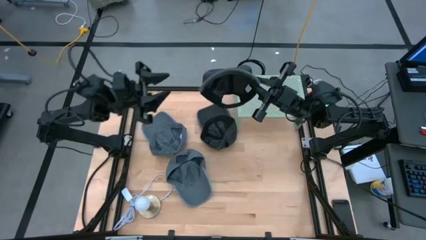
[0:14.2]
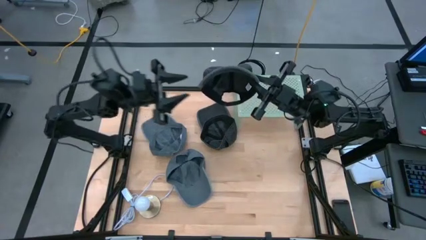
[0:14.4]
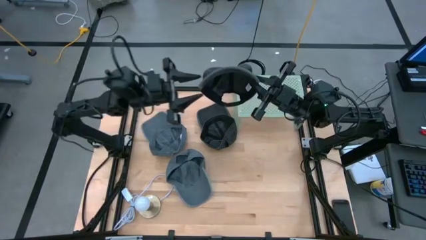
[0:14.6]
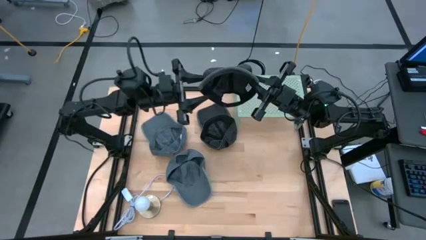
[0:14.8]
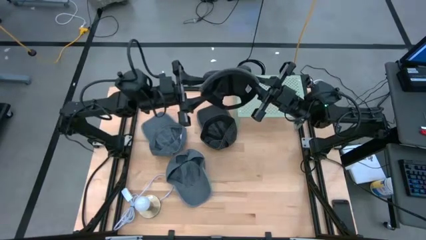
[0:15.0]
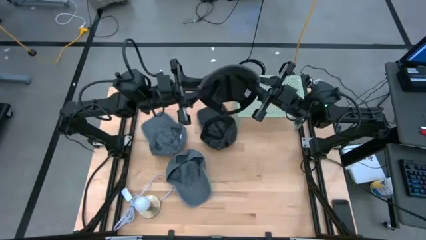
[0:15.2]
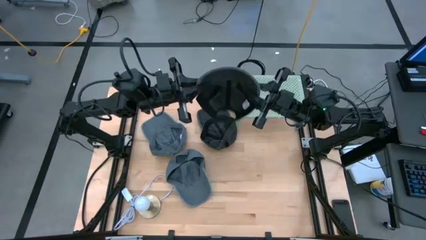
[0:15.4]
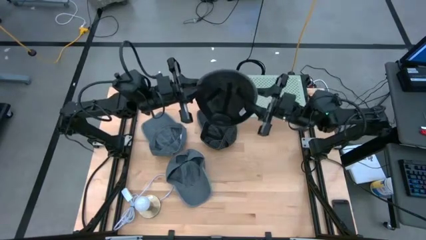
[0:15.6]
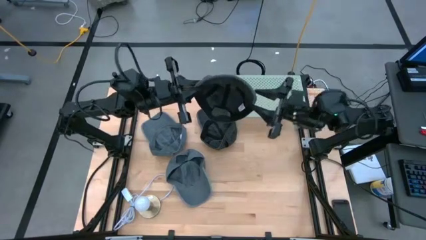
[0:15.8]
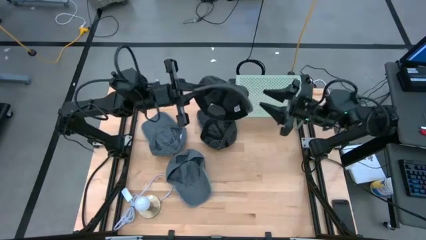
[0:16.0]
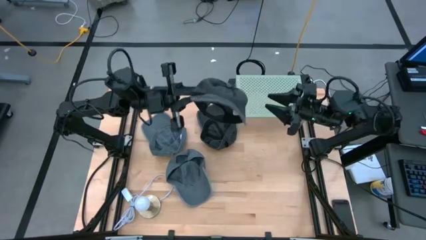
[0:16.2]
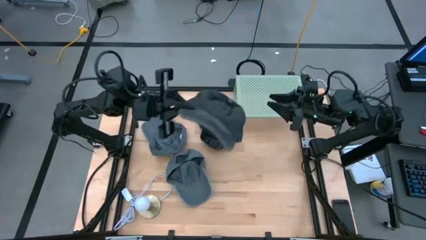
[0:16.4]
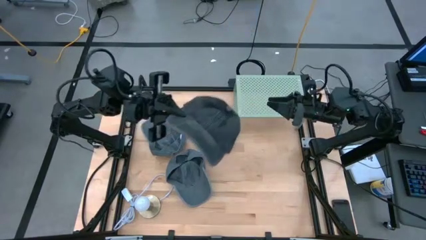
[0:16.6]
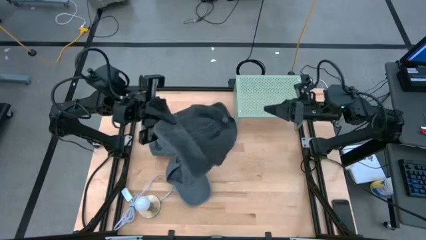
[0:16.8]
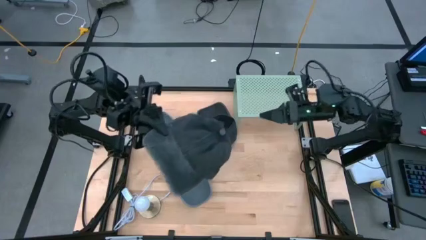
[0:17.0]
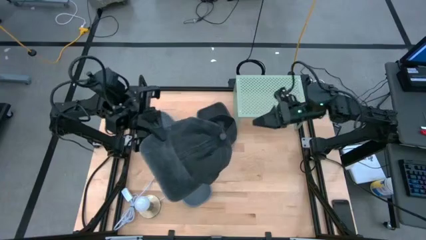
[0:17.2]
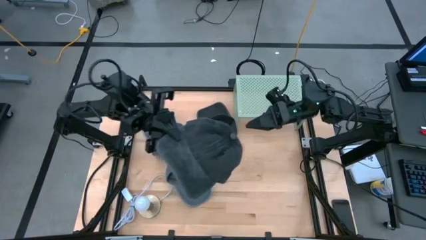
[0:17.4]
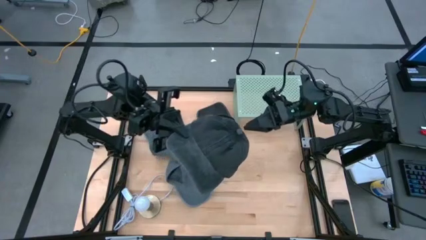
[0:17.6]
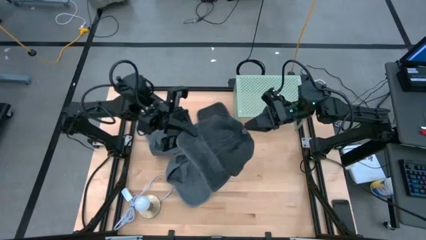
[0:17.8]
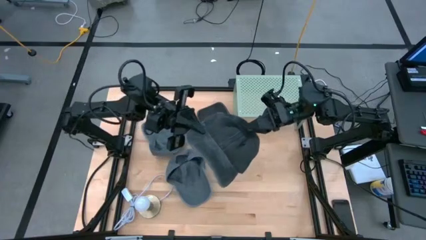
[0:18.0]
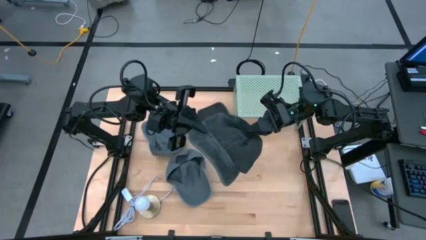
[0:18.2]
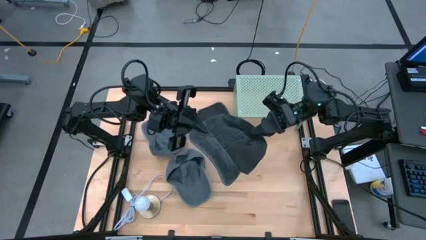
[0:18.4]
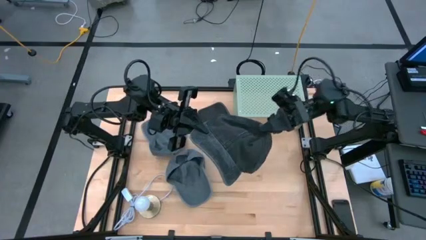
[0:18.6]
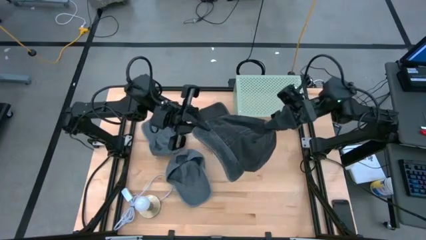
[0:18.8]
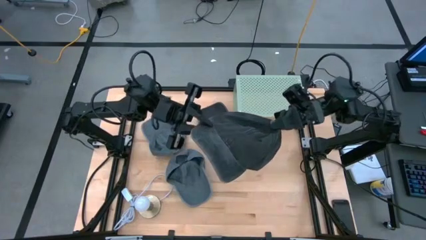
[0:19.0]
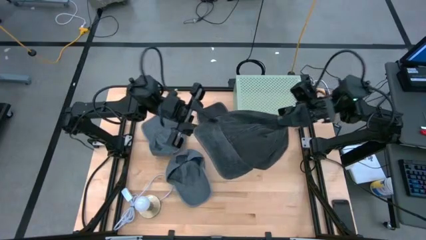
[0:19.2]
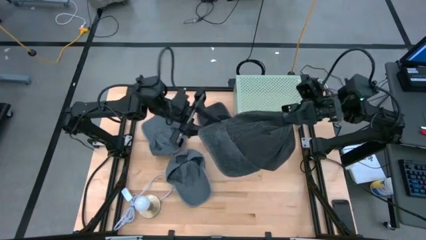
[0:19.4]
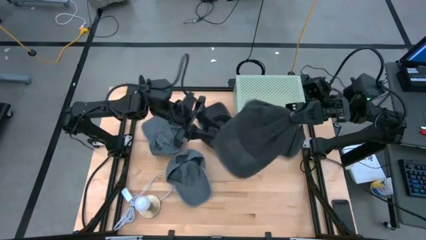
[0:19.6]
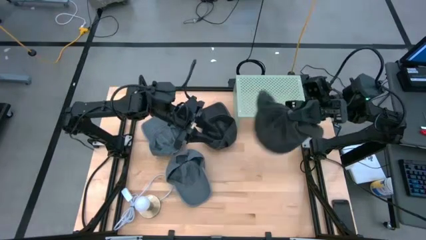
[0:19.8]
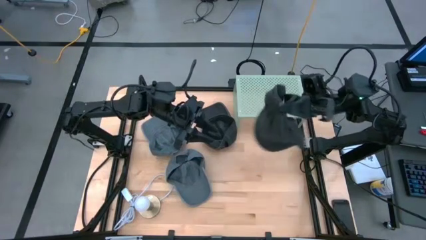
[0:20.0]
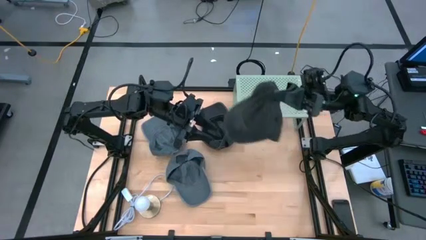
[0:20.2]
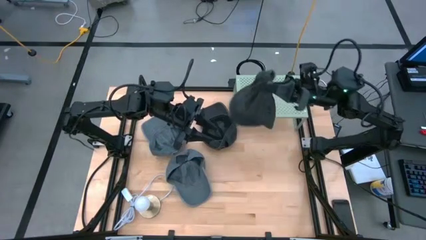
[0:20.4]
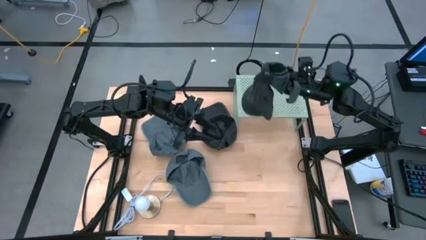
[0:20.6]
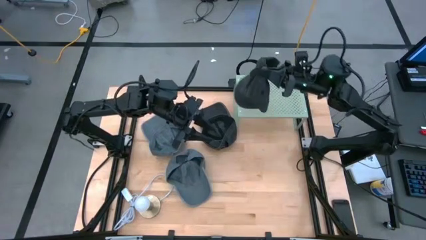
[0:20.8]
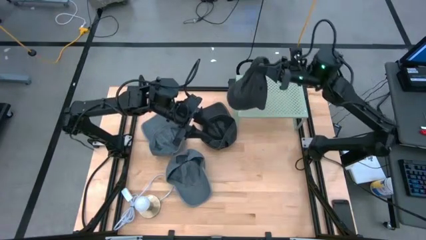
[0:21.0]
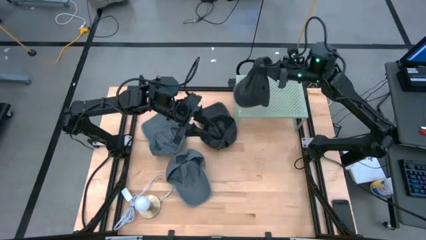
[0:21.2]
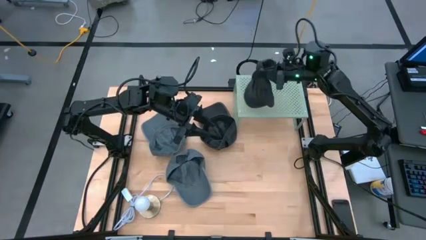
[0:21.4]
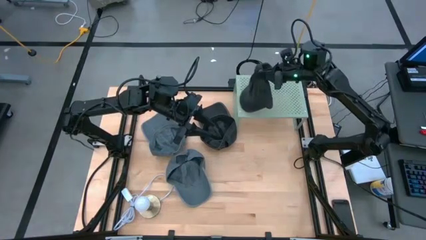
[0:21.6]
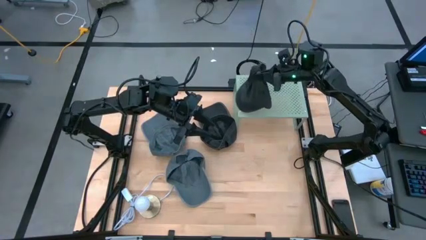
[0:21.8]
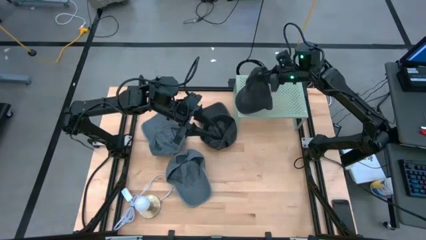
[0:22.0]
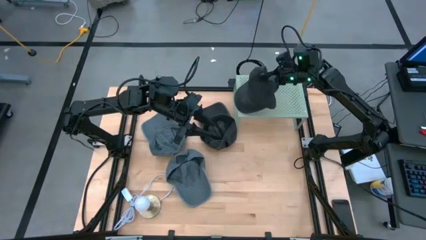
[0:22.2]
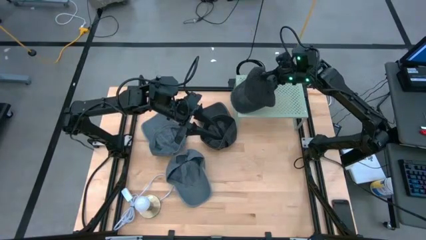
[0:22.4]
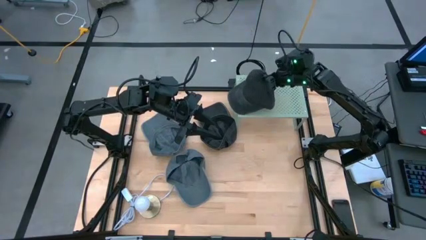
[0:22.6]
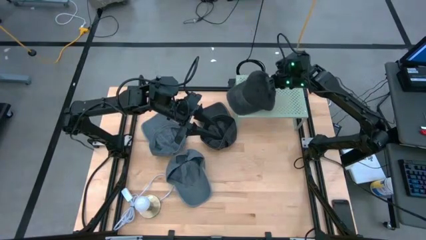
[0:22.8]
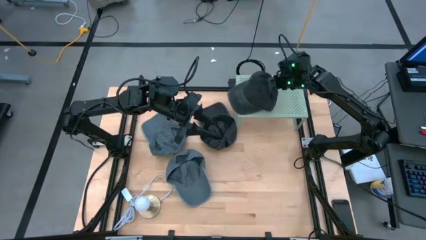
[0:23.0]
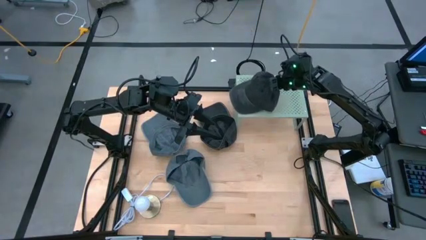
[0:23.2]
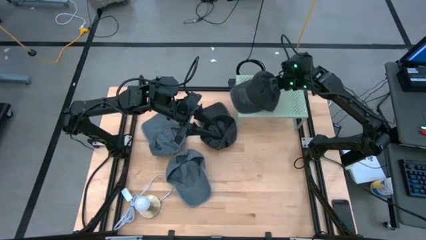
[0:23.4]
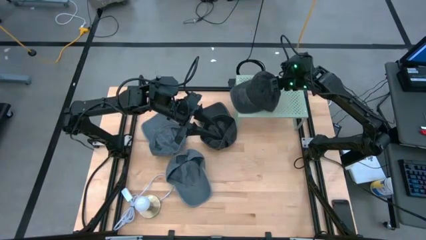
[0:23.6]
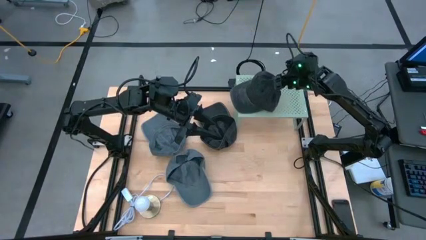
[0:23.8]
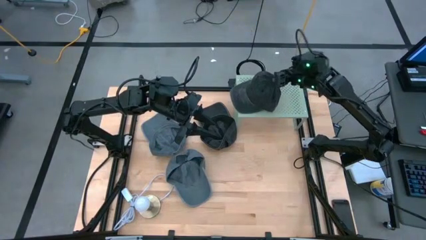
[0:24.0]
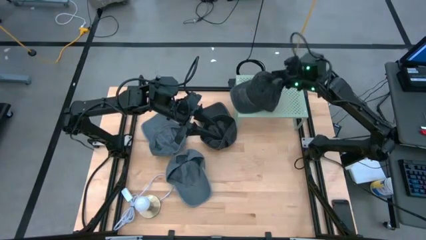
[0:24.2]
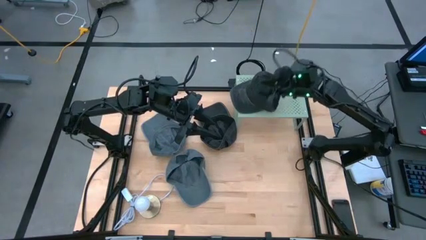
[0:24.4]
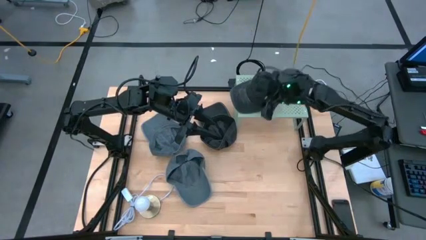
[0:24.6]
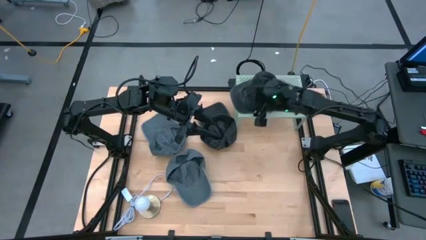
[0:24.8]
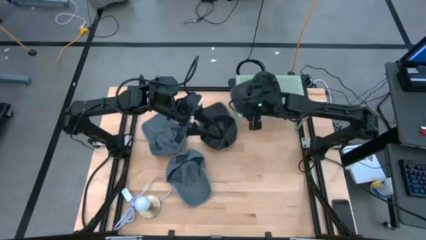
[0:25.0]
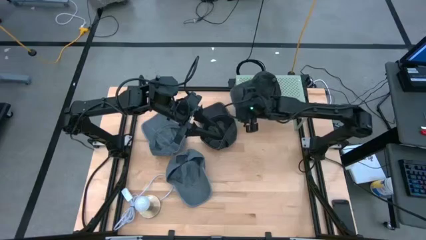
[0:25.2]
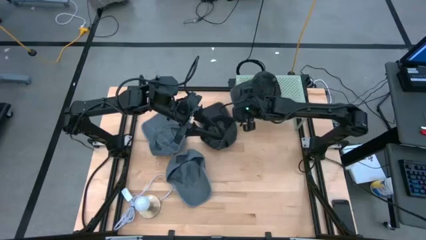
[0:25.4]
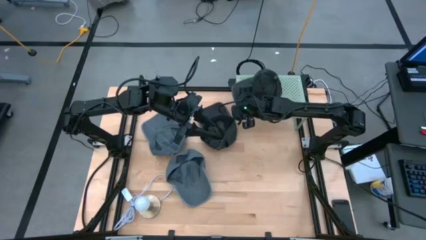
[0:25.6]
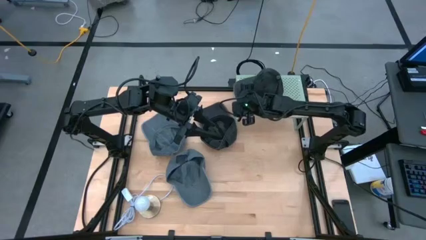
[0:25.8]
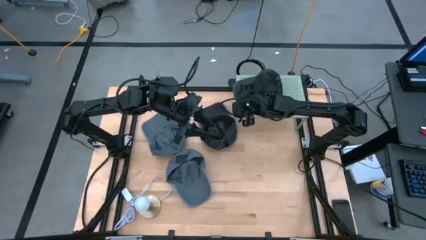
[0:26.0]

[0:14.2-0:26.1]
Task: Pick & Place hat
Put the bottom black cap on the shelf
